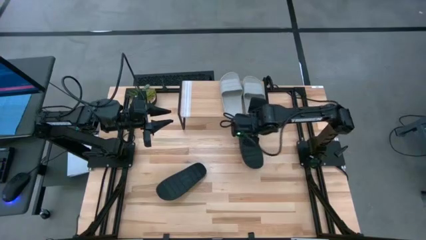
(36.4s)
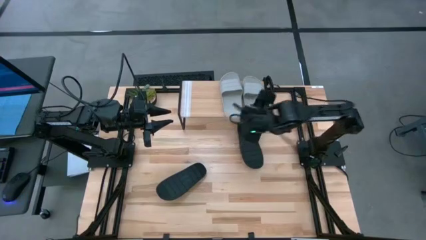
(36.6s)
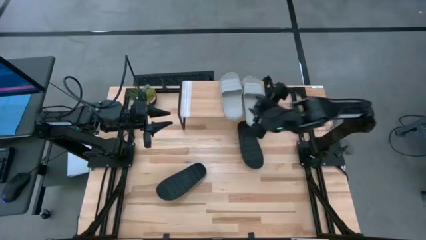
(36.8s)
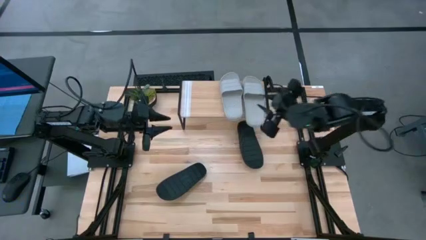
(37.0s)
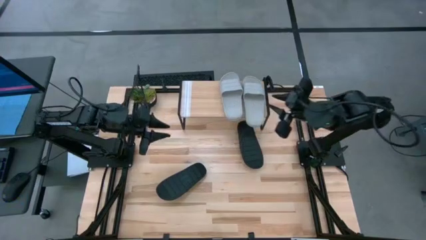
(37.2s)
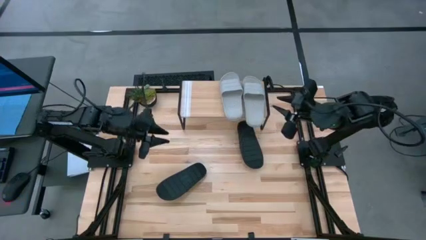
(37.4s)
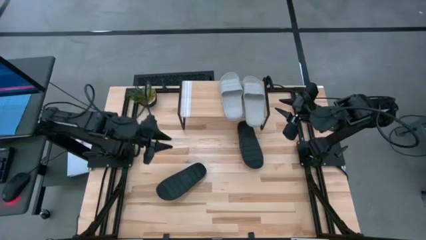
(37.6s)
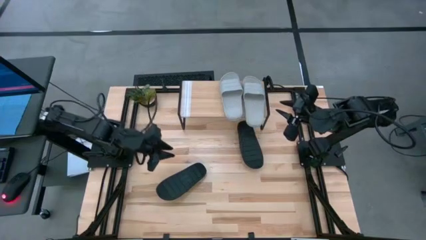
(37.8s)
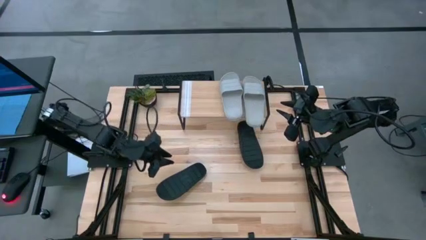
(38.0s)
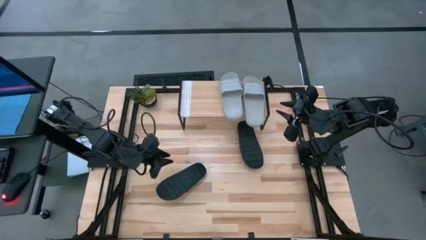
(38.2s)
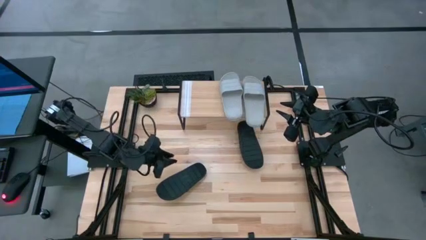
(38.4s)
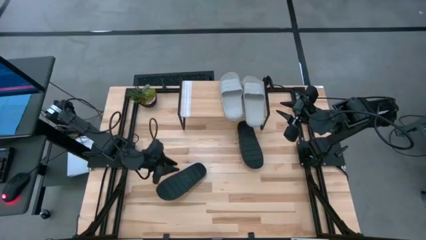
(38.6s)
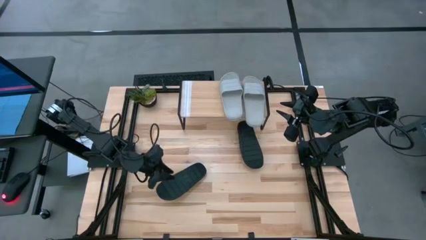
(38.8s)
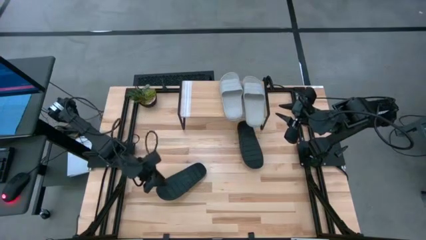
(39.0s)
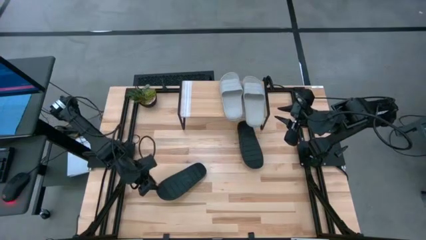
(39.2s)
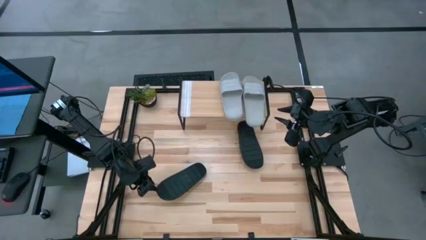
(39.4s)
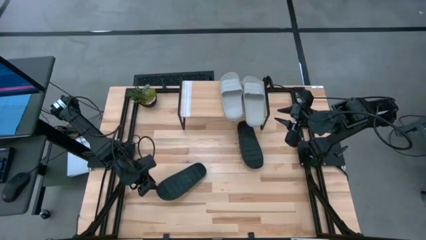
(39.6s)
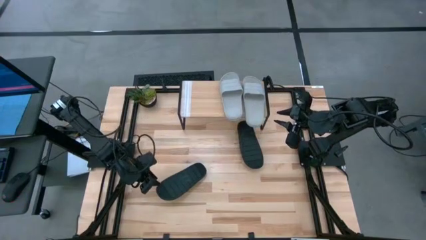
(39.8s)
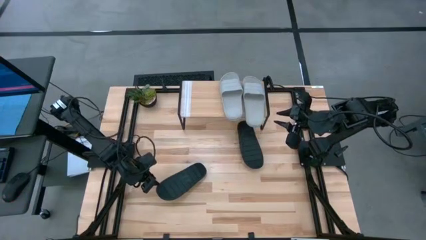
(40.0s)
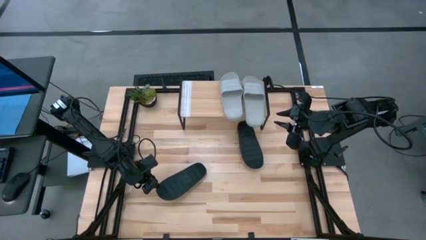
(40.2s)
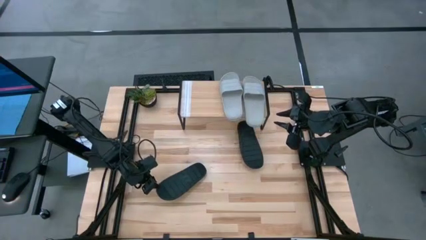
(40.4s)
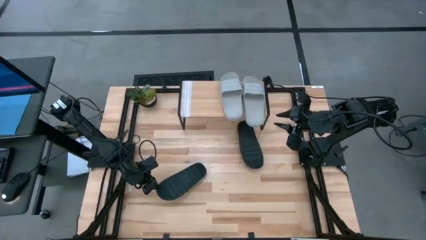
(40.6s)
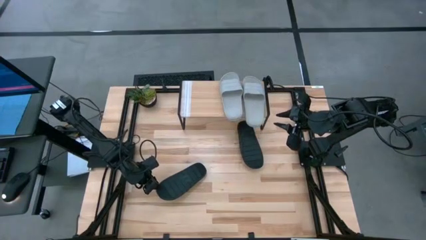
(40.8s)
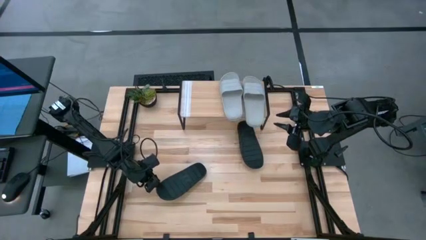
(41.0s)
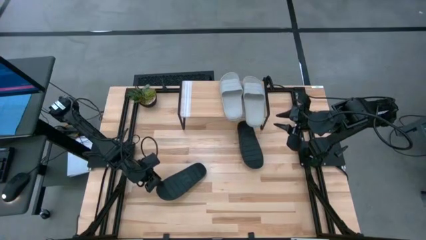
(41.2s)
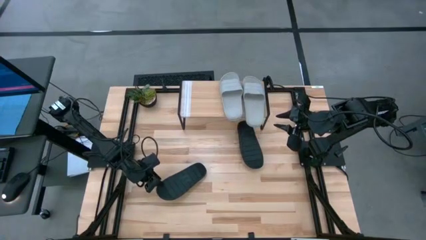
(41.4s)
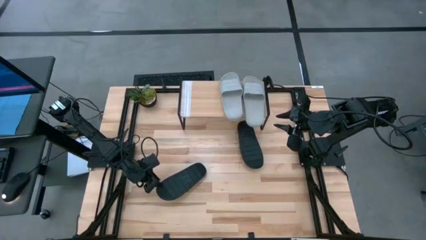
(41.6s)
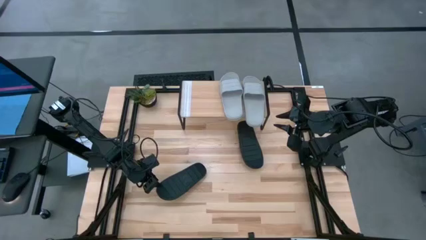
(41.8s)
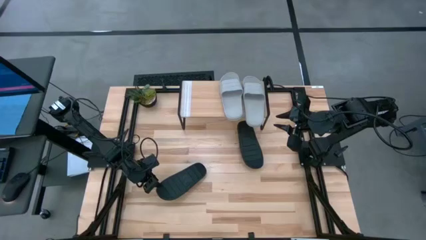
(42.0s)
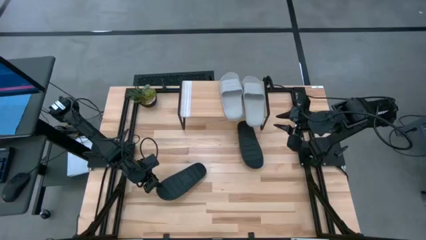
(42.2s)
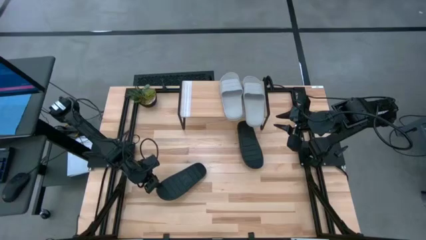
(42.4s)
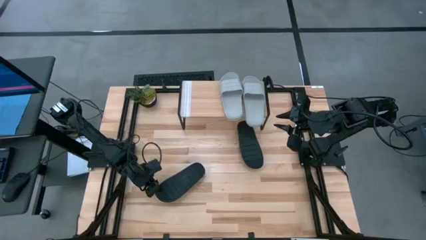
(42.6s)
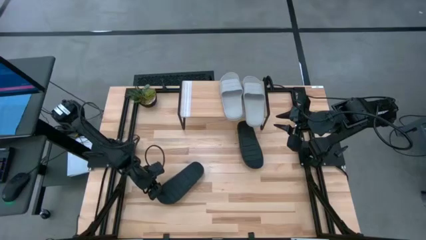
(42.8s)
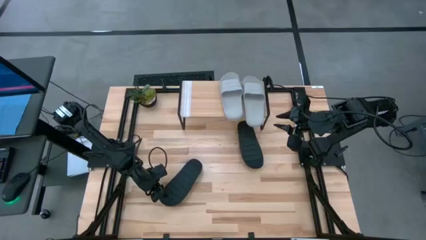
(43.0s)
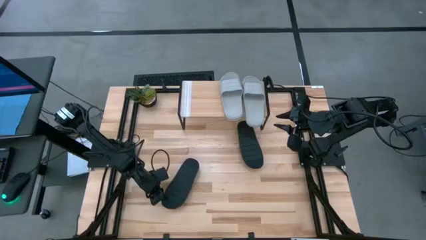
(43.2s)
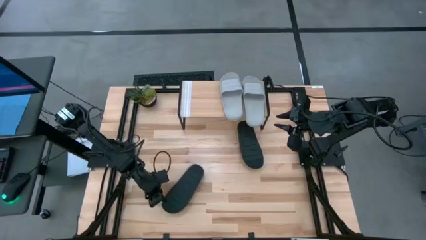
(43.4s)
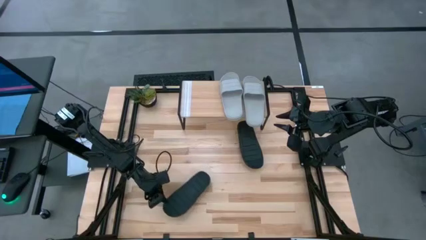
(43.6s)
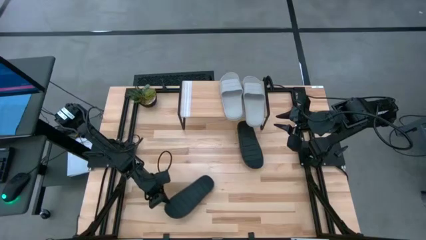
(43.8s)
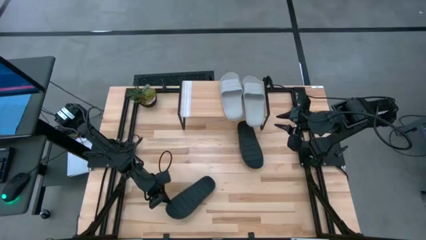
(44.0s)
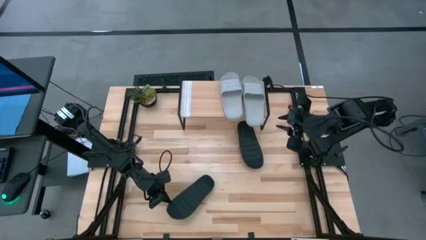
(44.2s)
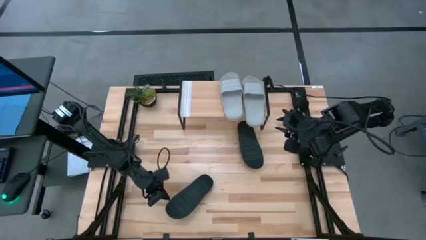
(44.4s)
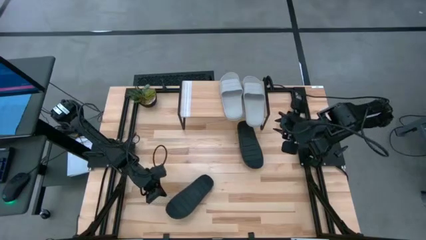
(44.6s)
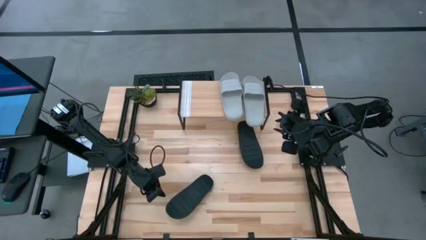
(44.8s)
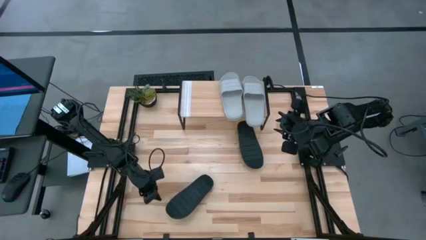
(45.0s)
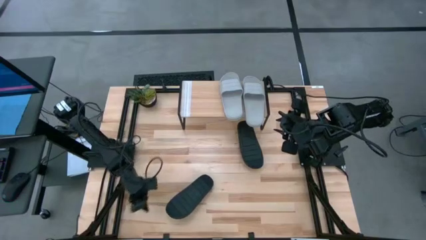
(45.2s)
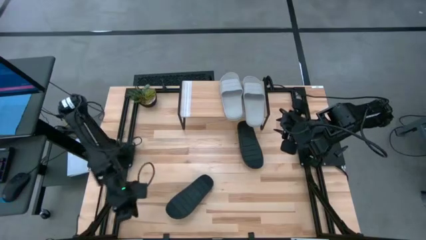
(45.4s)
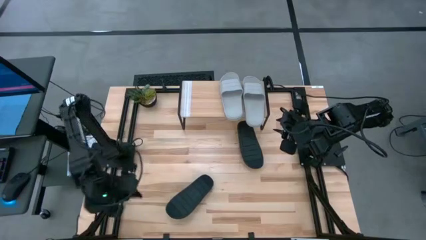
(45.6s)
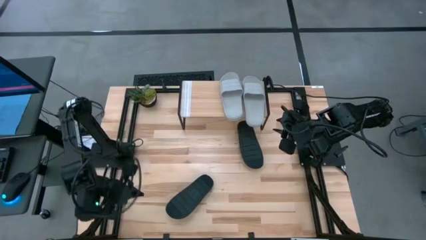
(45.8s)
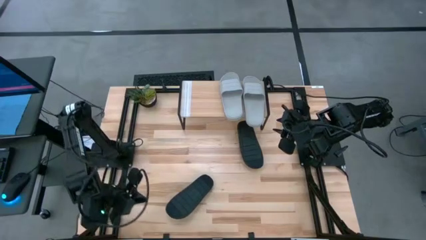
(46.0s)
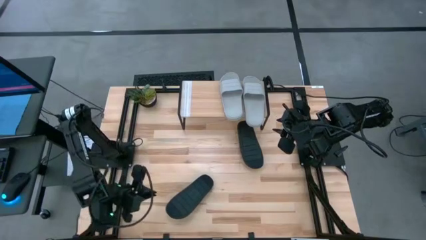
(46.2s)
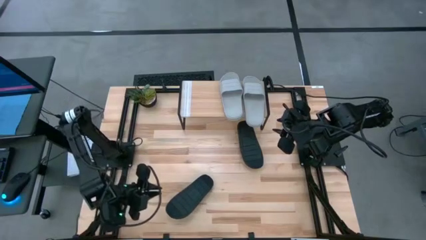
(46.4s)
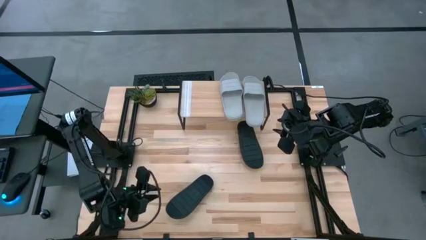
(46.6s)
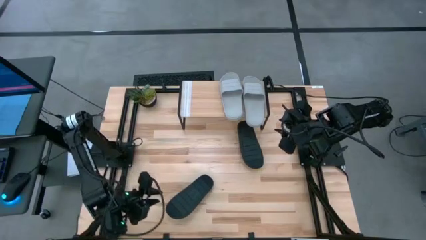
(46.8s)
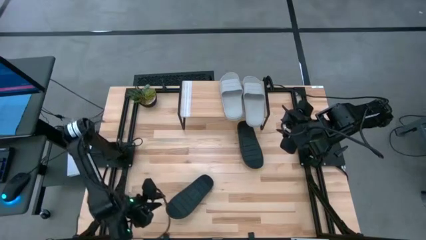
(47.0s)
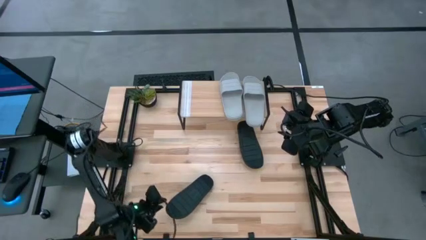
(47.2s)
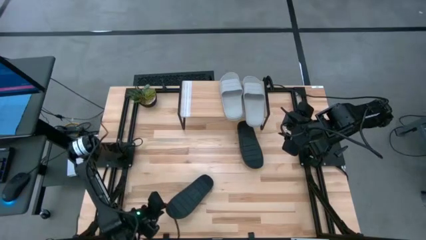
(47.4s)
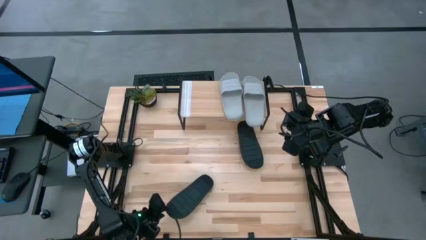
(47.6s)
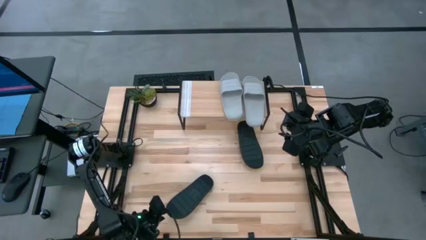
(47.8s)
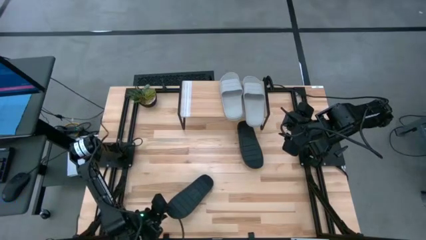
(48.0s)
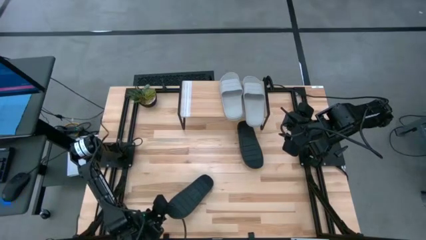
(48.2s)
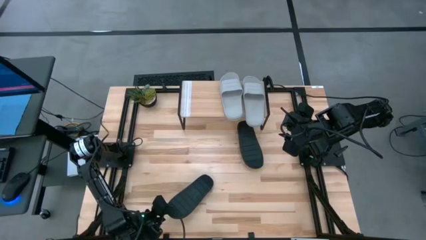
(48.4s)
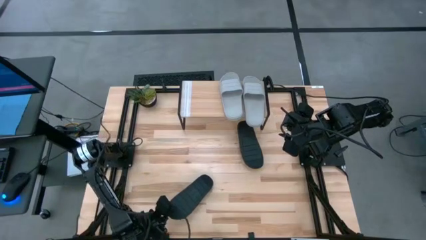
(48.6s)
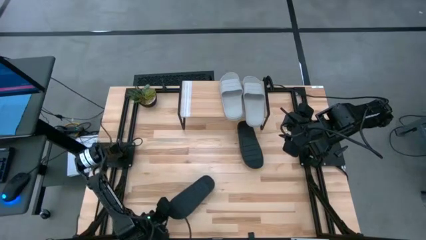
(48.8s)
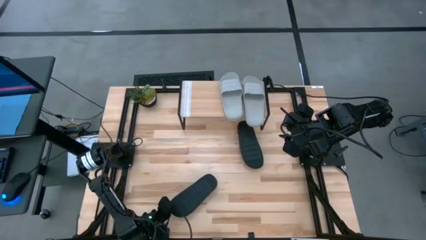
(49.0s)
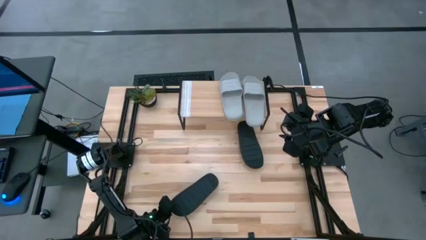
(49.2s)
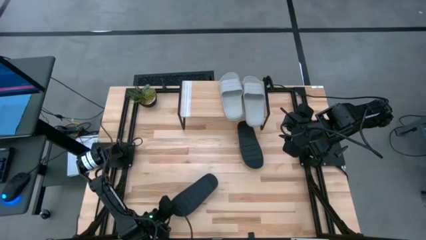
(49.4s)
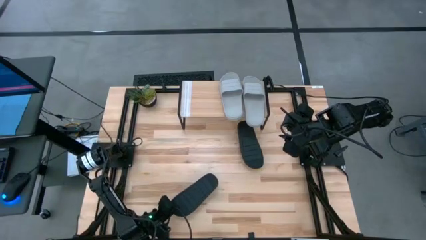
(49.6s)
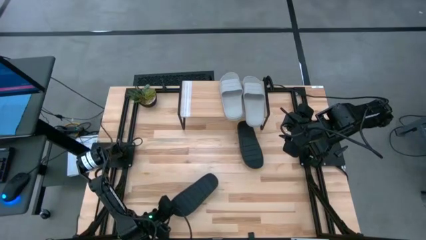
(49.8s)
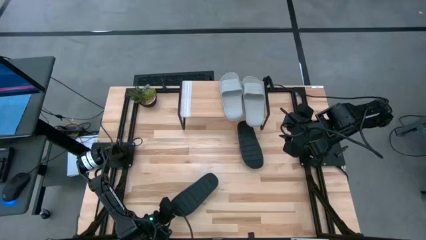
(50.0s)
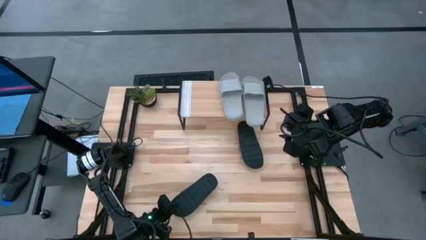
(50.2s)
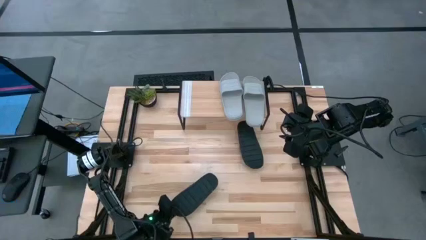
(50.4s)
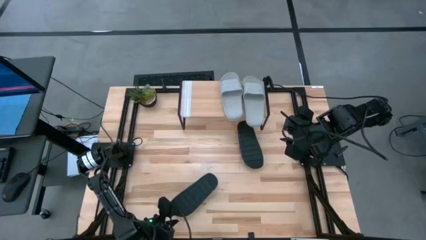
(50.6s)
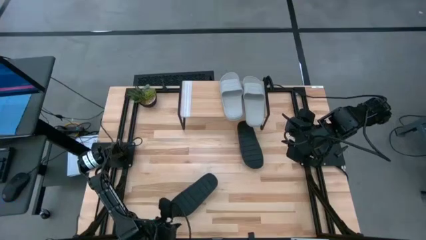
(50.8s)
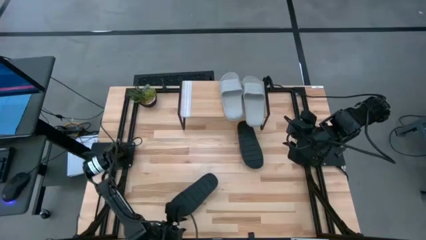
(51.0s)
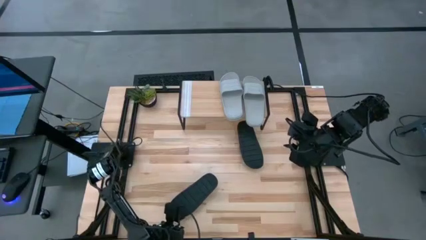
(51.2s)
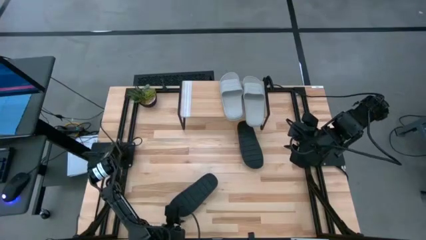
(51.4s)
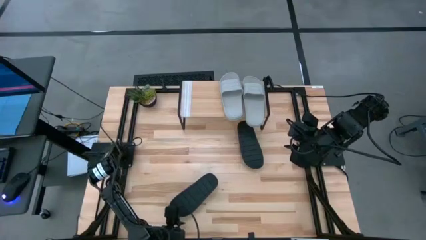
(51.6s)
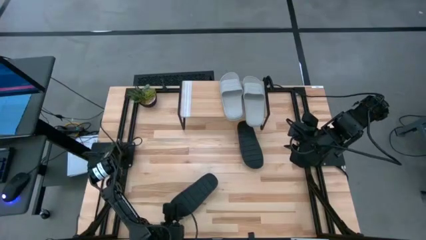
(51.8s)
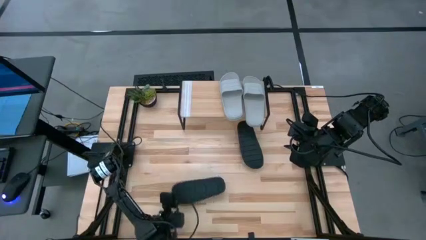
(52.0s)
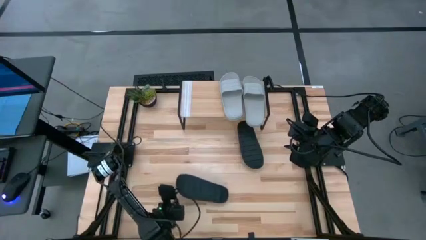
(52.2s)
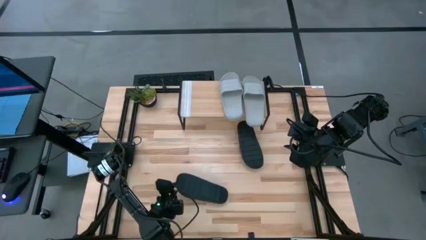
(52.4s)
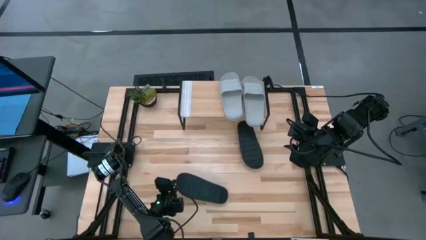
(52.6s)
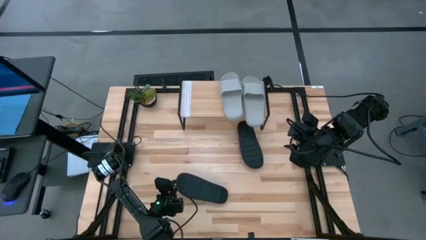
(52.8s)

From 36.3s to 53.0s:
Task: Pick and place slides into the shelf
Put the left black slide on the shelf
